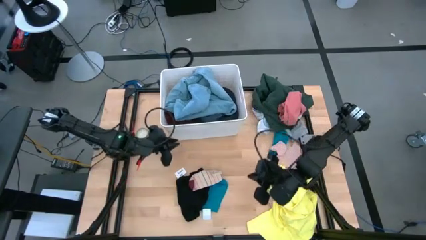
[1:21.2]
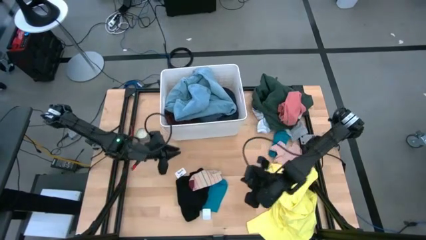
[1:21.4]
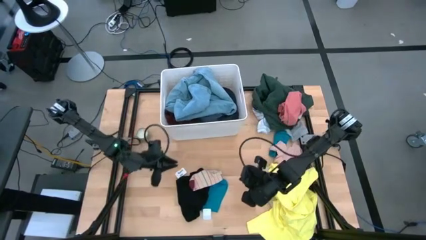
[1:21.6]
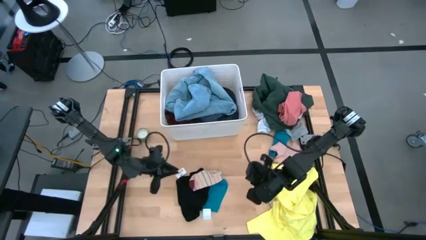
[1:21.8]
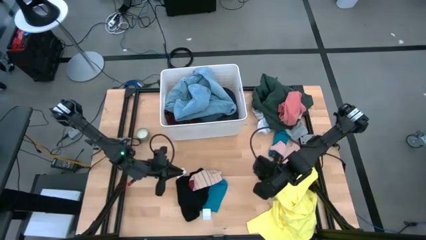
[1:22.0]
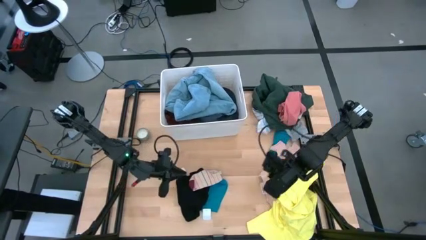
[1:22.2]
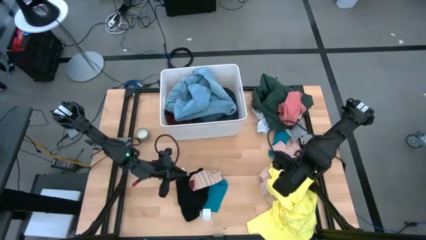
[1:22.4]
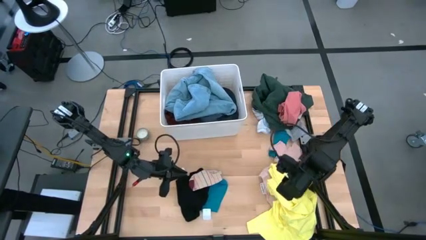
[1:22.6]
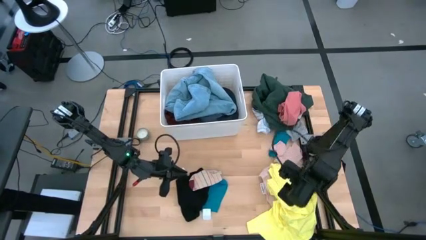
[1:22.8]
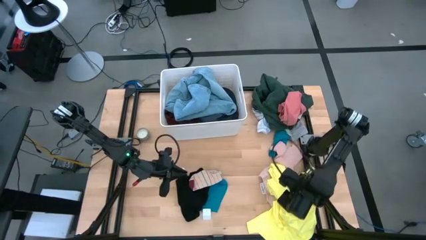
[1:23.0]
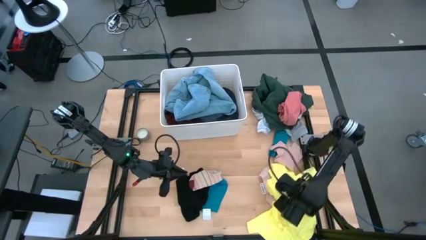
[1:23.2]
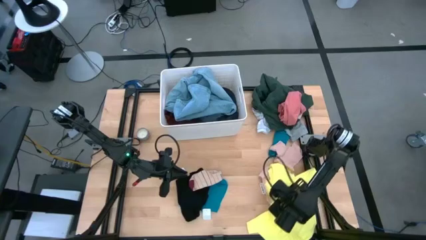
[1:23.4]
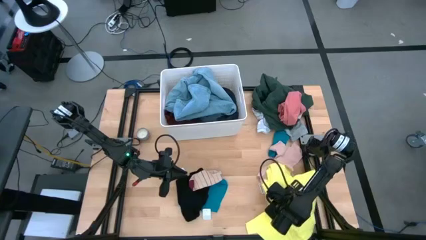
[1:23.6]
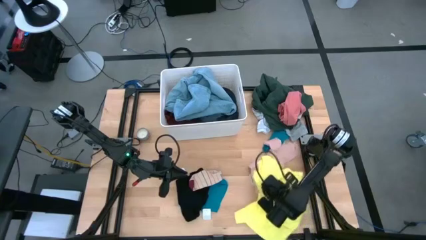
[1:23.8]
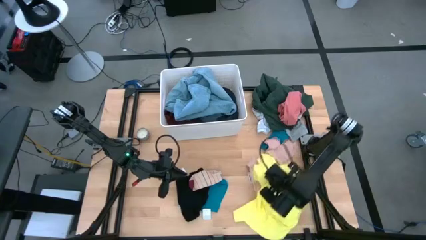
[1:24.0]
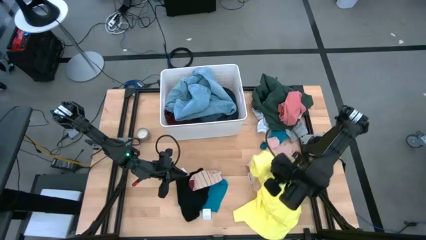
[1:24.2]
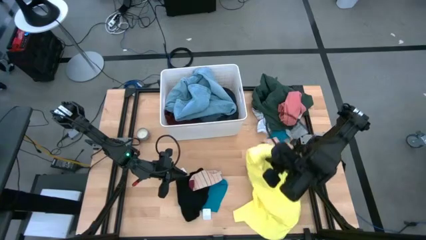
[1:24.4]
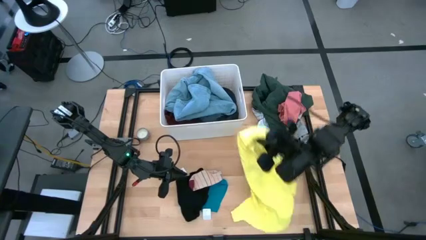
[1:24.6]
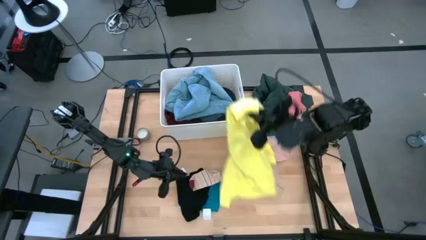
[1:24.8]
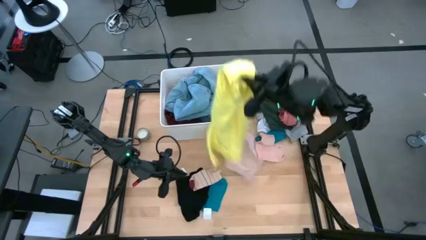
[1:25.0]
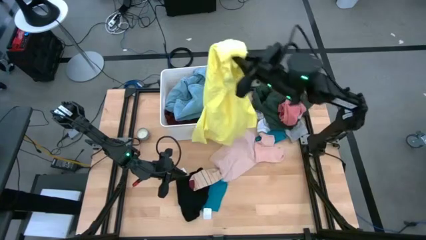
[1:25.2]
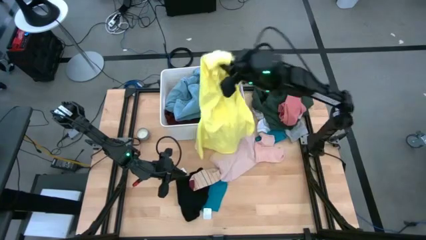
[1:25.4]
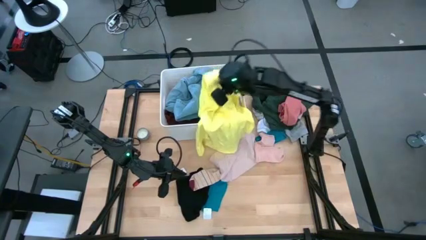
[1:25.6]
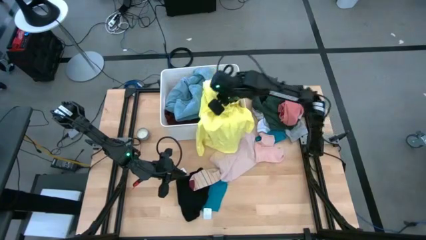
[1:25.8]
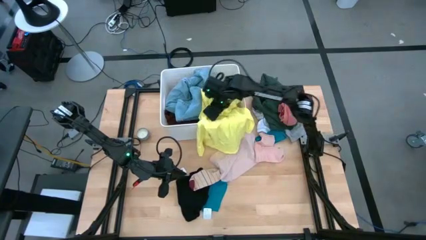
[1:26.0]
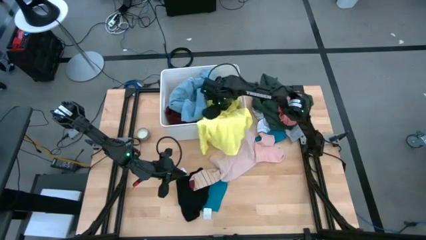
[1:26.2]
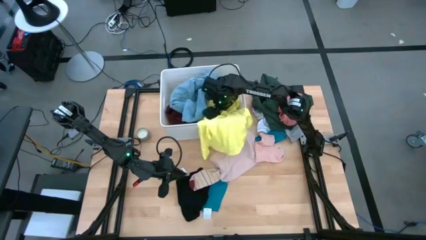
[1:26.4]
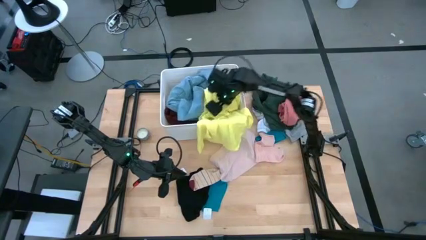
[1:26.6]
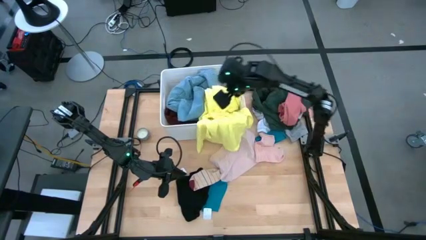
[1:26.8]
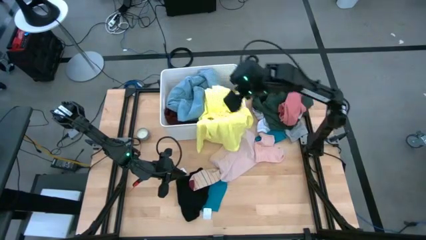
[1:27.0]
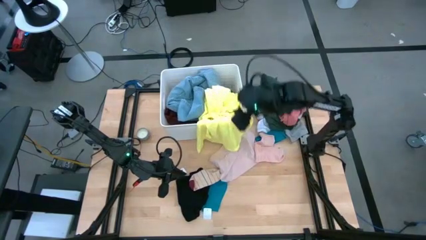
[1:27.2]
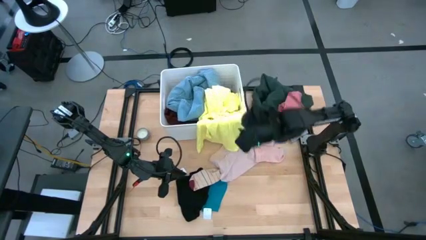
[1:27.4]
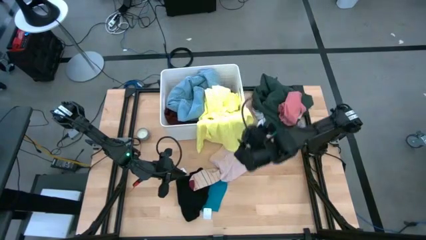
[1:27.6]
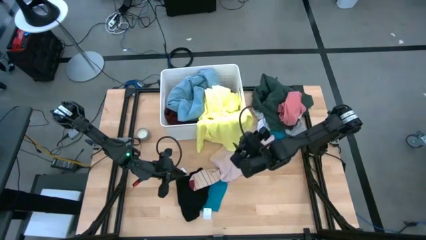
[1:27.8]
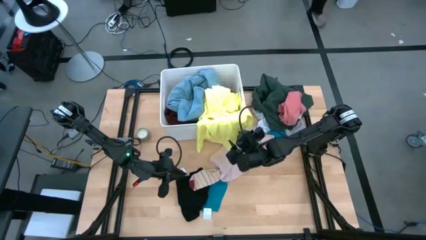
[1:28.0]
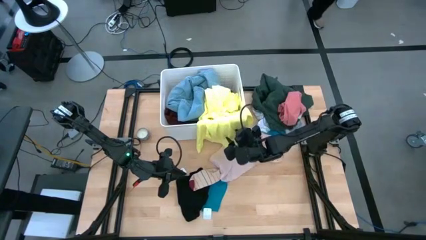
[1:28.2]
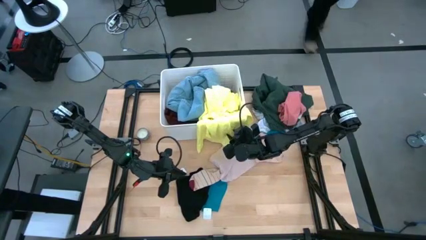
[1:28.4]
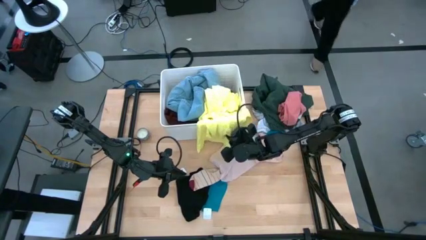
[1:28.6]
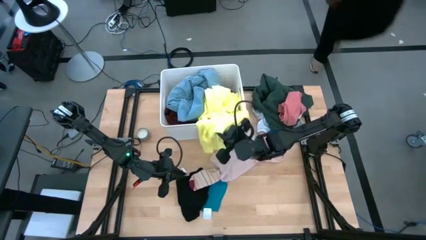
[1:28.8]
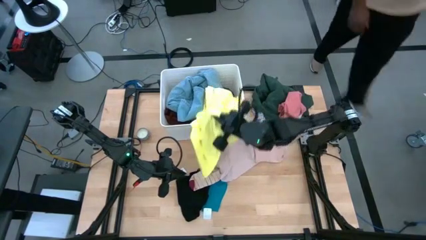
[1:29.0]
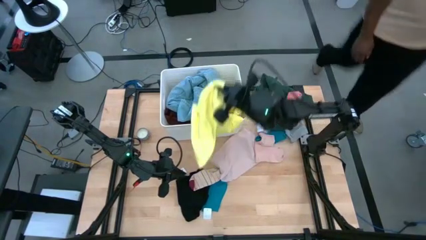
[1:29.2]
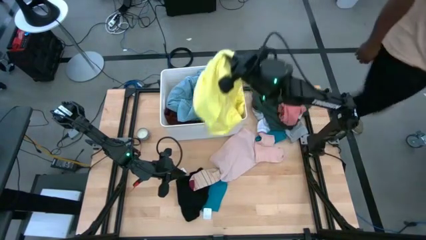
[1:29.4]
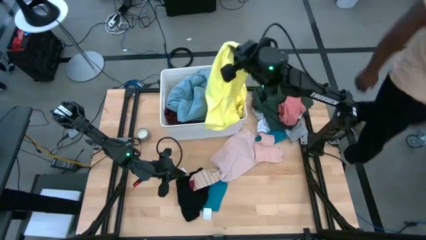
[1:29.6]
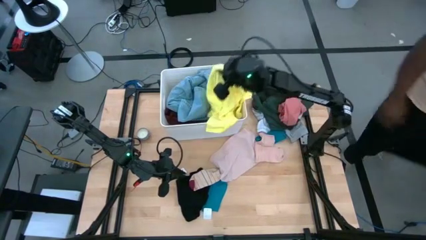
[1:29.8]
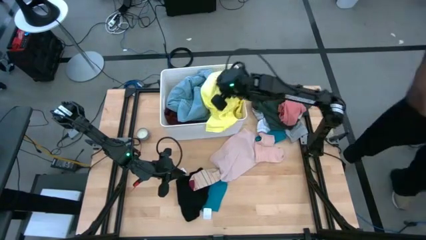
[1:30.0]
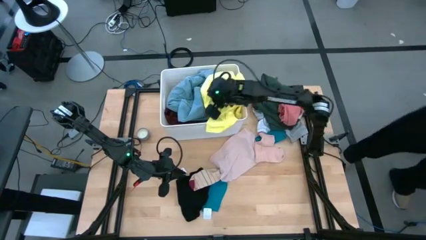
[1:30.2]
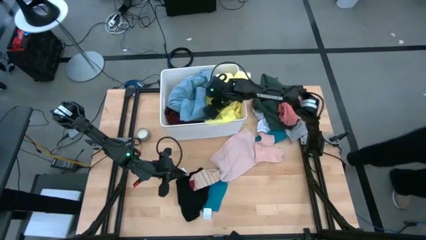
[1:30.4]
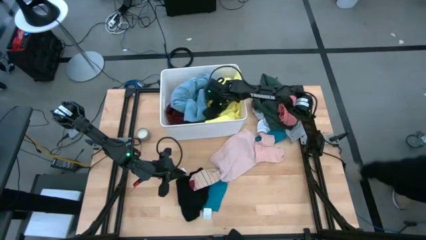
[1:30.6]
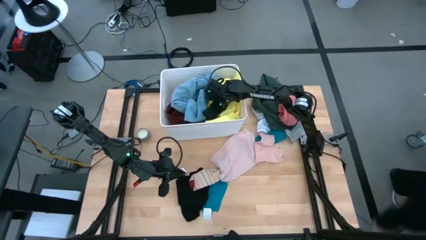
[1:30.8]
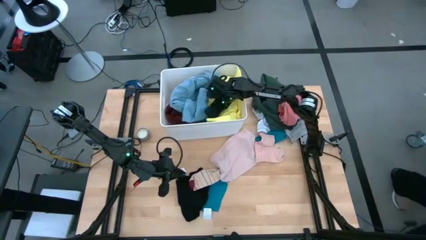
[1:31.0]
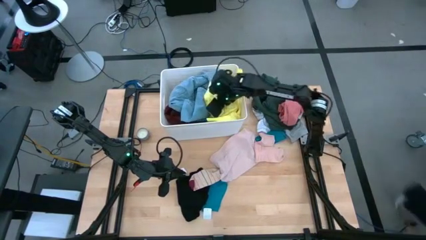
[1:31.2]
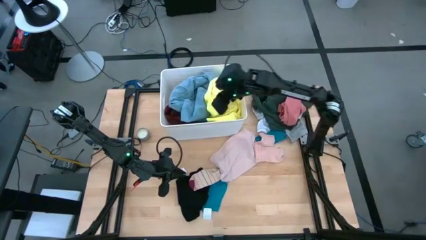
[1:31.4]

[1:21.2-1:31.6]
Task: Sort clothes
Put the yellow polo shirt into the laundry bin

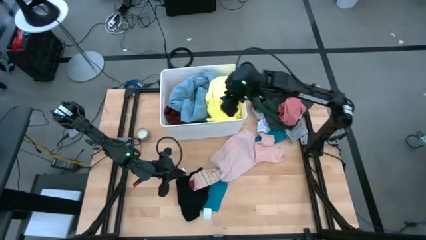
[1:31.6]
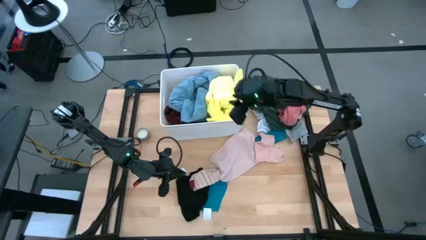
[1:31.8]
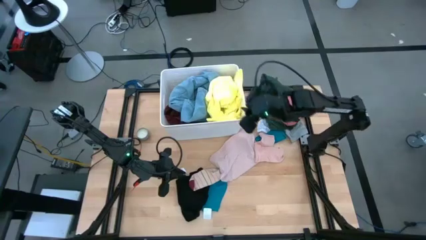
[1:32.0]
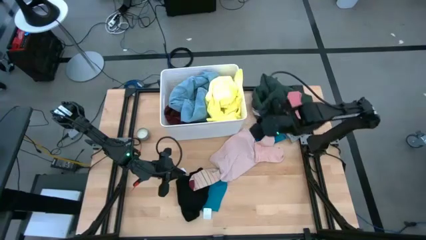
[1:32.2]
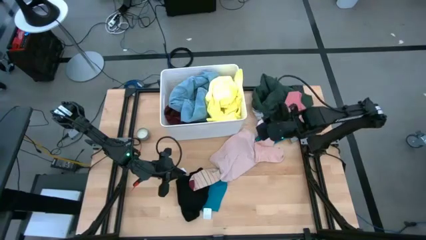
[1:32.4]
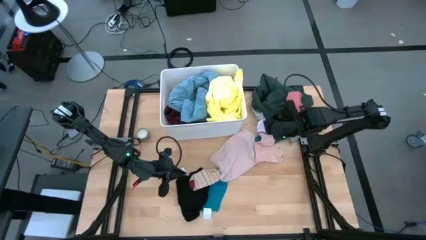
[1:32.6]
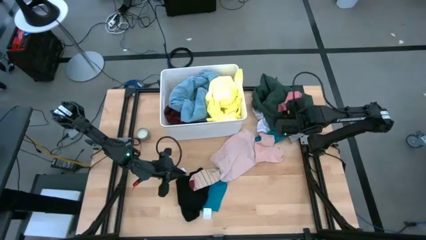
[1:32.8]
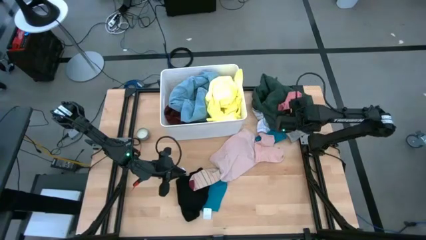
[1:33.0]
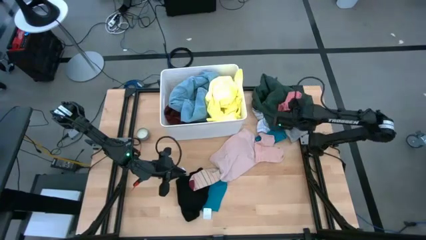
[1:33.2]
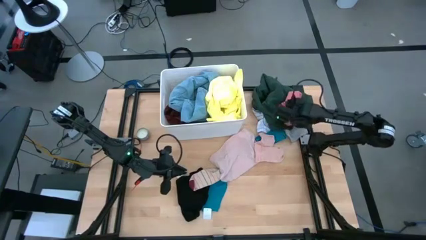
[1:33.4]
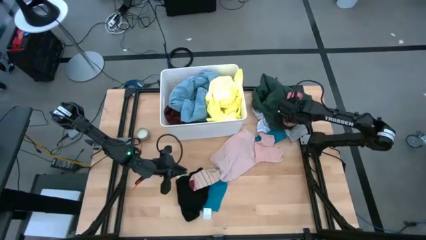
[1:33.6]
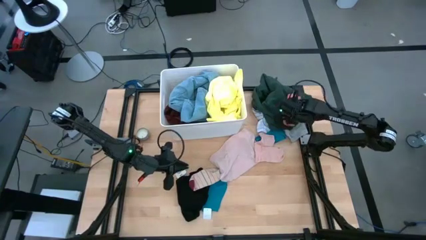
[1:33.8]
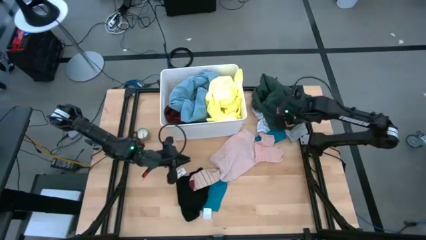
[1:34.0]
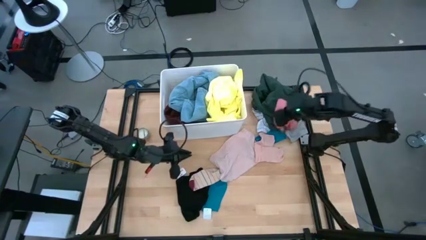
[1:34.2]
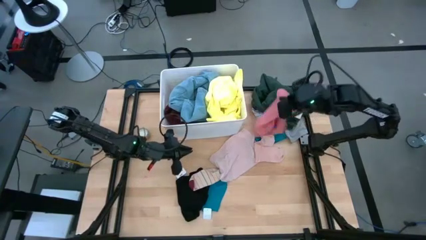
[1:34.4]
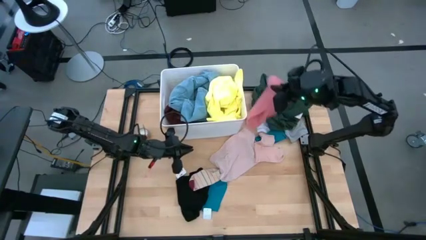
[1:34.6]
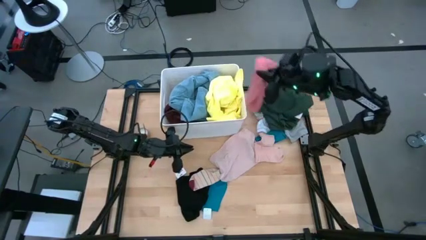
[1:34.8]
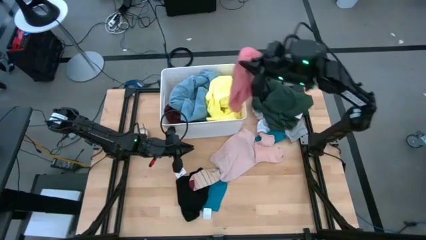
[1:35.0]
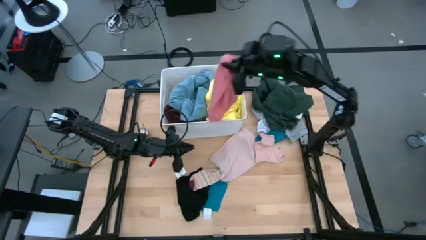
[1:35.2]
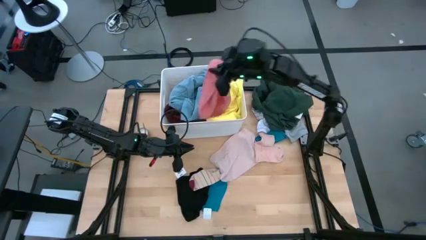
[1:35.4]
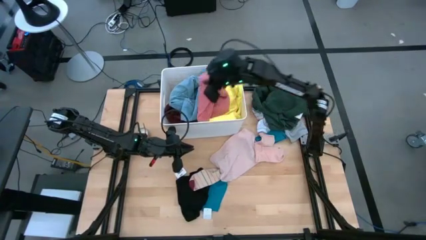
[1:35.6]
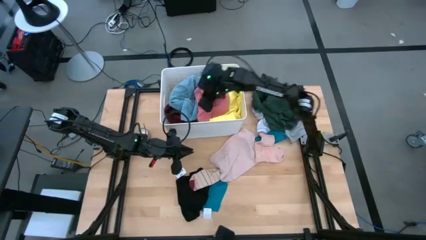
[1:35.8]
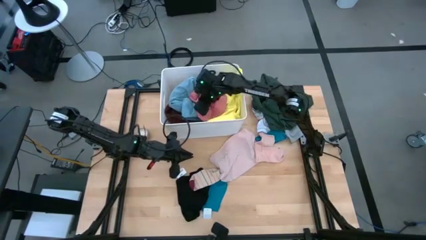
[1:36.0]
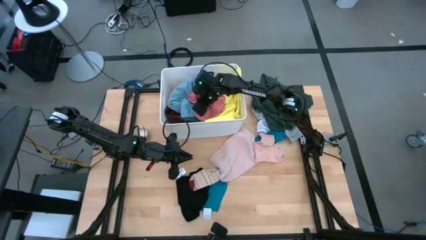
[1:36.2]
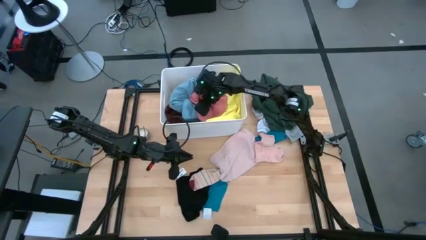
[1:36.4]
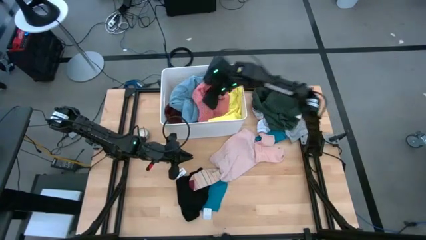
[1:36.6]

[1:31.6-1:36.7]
Put the pink boxer into the laundry bin

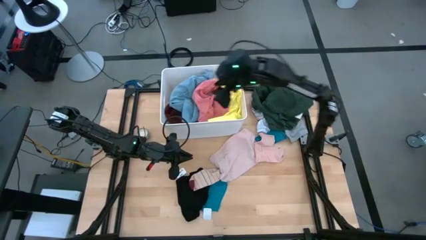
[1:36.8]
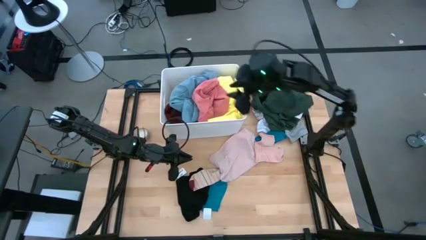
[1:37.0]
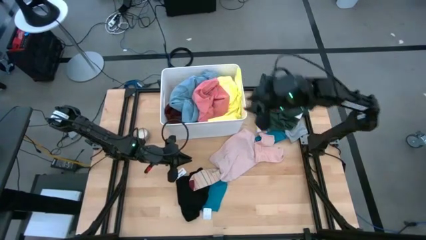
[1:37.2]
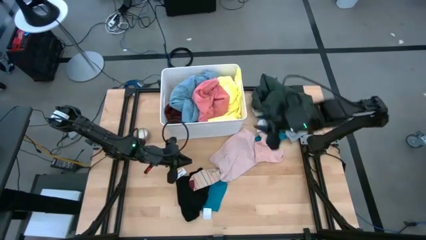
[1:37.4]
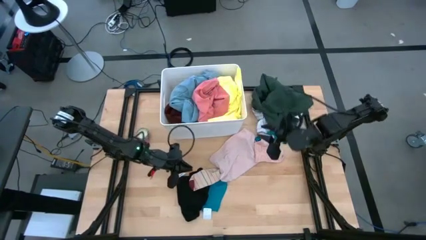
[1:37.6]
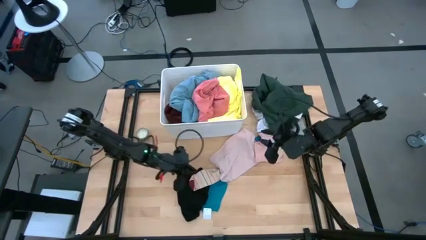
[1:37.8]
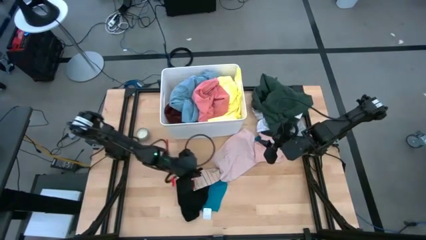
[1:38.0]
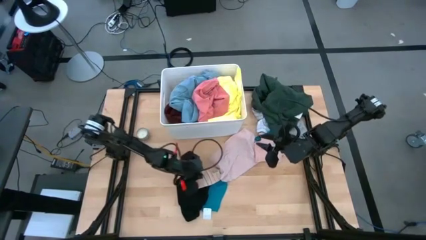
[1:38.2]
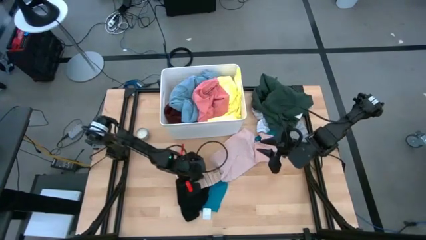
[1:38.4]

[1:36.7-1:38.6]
Put the brown patterned sock into the laundry bin
